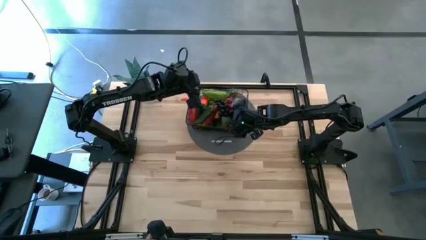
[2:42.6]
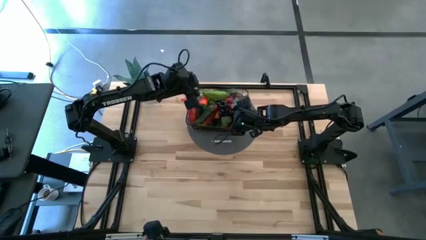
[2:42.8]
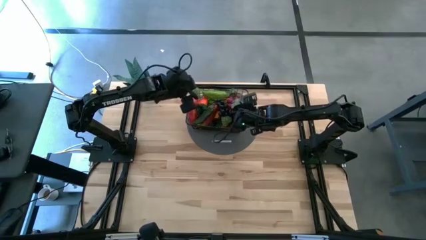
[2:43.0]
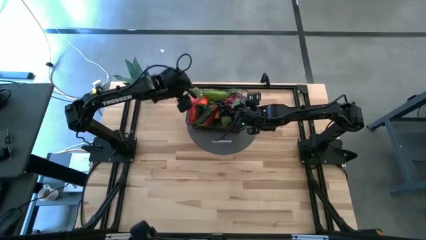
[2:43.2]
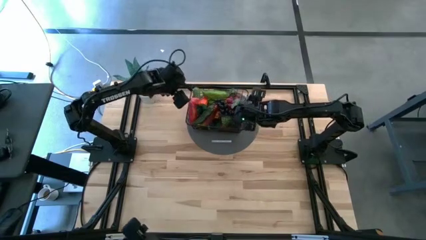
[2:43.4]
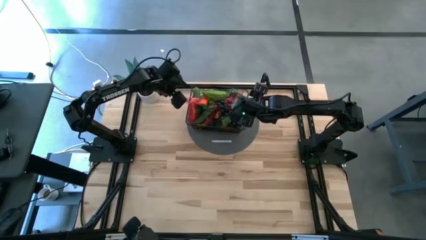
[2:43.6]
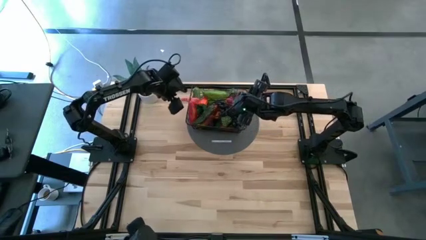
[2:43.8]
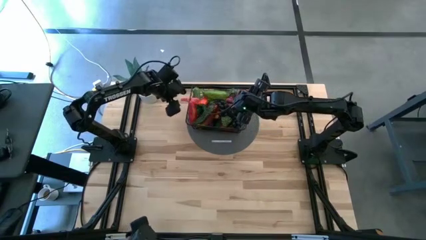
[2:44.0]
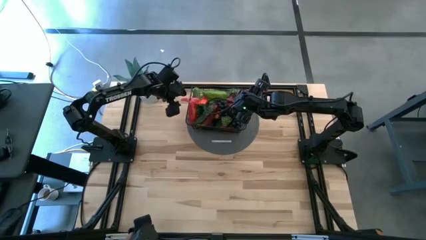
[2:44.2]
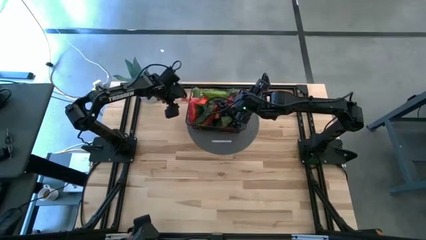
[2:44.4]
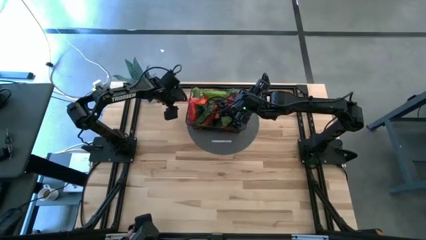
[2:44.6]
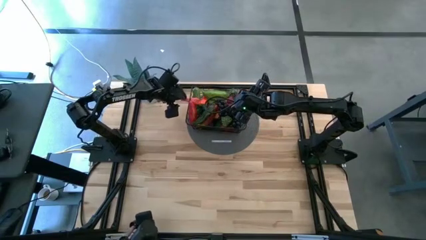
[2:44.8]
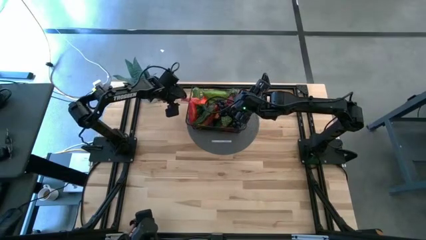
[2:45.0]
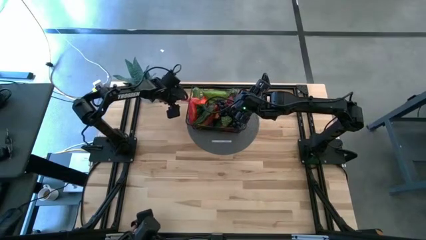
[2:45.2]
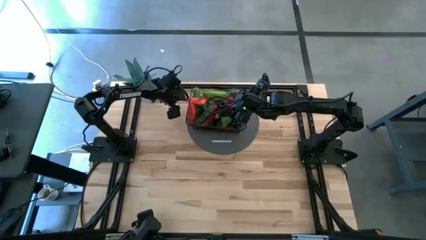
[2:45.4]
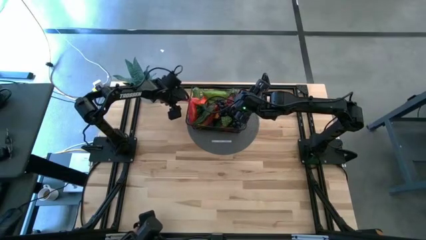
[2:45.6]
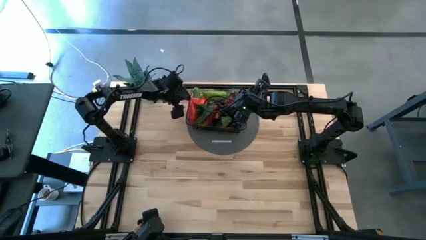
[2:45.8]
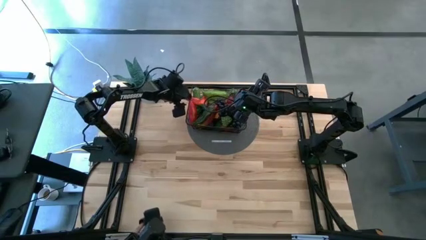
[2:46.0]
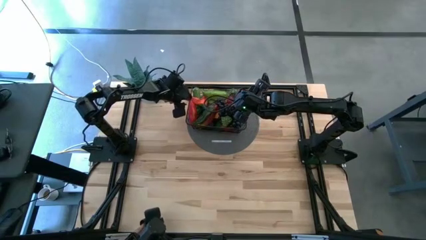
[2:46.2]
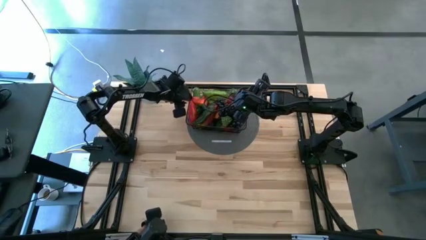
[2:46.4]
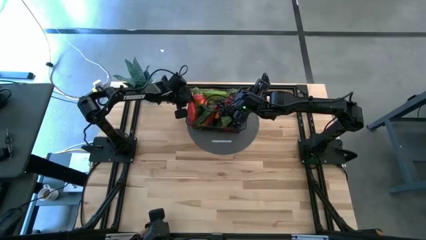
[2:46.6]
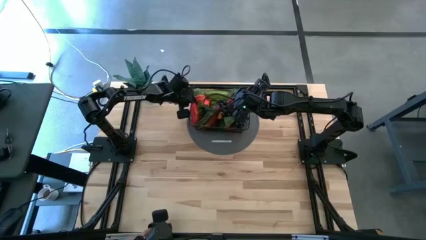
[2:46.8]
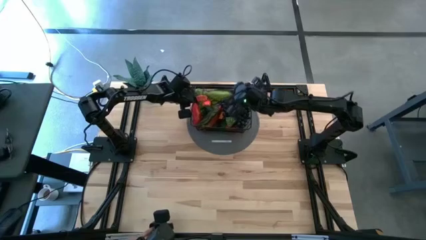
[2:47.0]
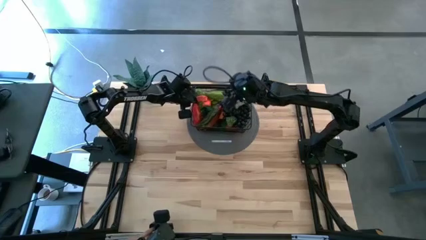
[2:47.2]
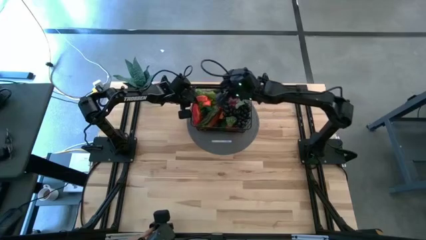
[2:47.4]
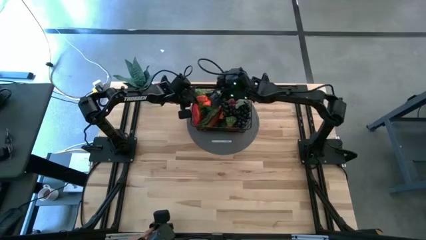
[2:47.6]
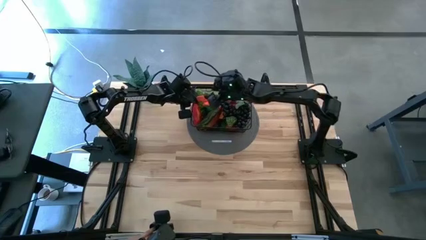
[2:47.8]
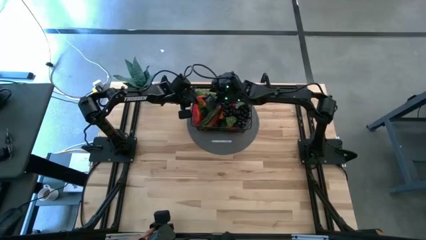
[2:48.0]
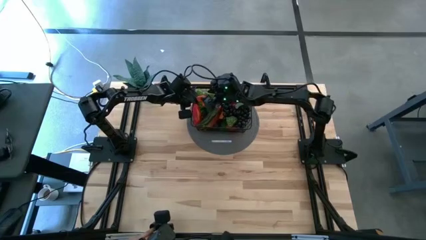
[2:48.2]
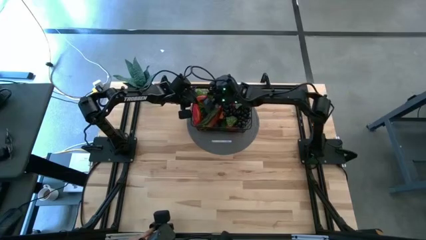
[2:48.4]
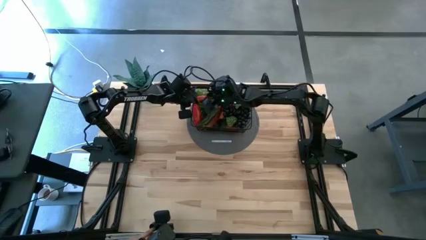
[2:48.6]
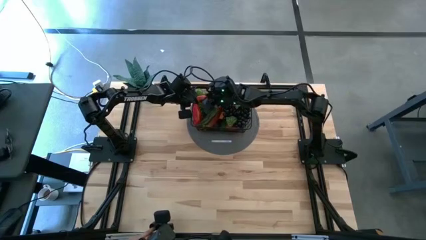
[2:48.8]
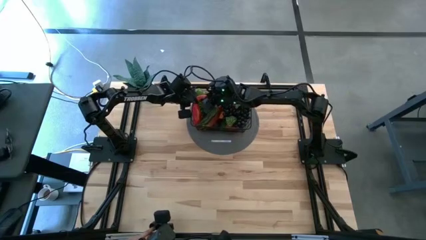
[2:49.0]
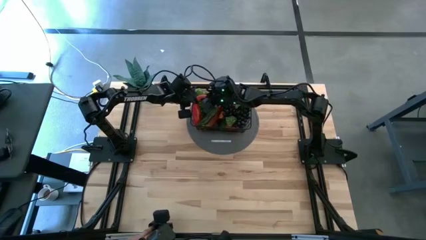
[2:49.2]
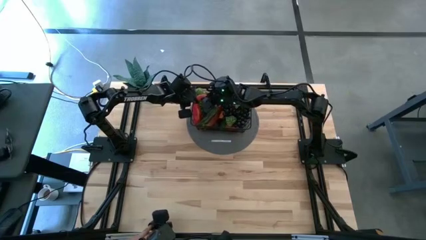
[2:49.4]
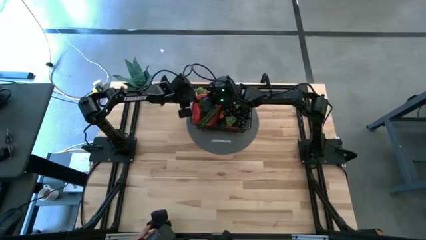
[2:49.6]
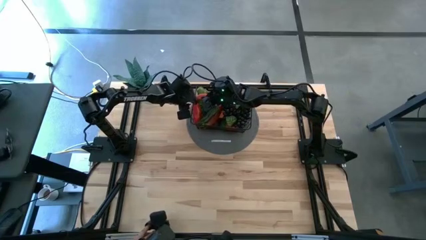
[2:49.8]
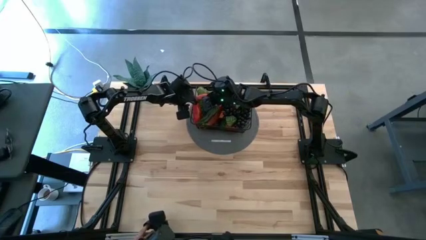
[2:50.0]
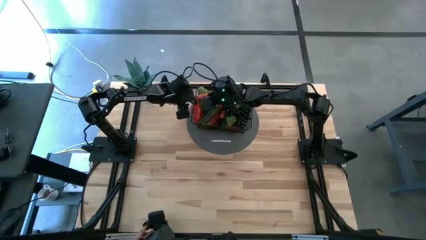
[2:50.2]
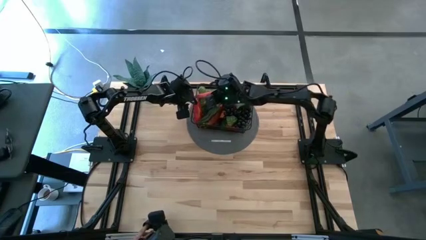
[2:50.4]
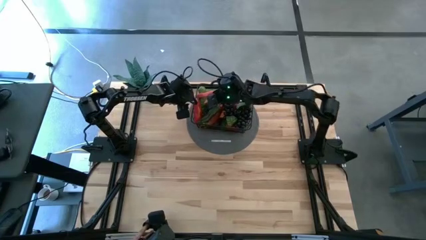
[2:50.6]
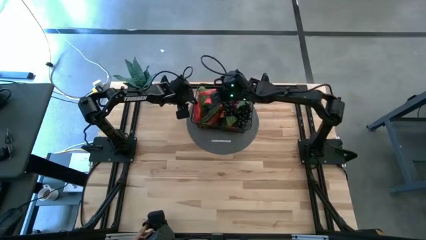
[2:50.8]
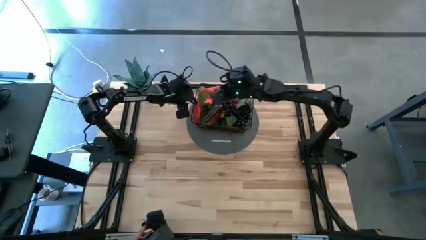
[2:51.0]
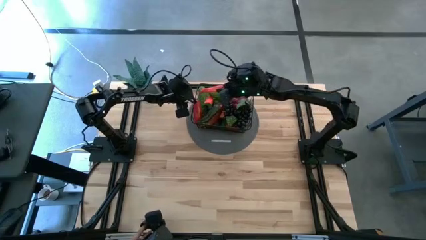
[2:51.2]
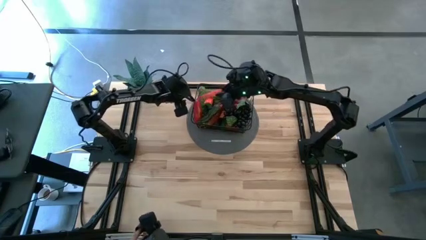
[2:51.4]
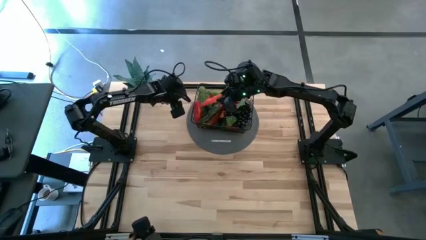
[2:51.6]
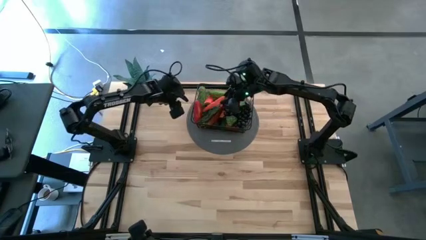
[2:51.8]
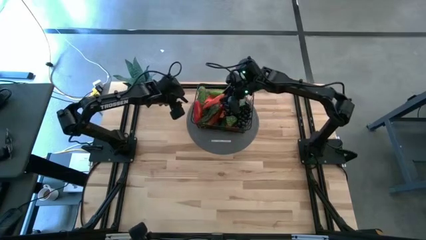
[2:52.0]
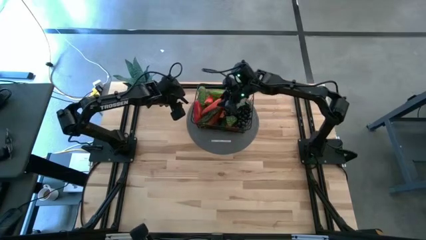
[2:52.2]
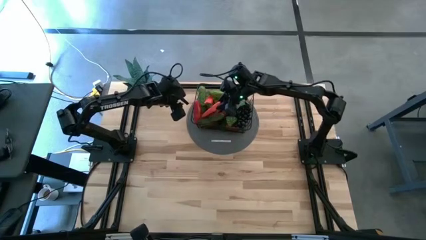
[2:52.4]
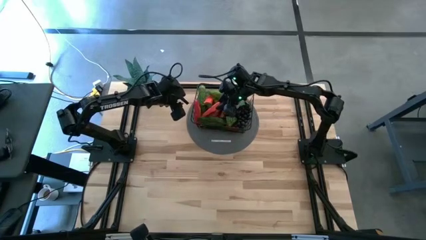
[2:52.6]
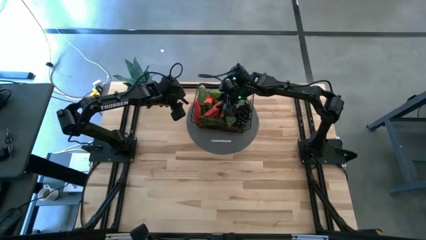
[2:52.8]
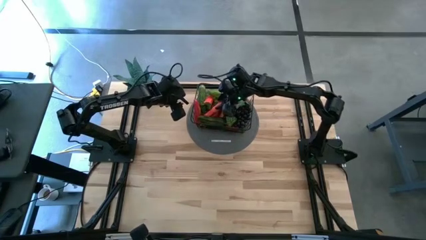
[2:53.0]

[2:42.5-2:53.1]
Task: Build produce basket
Adjust the carrot on the wire basket

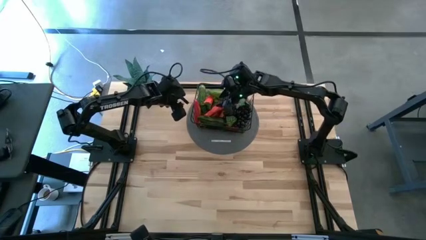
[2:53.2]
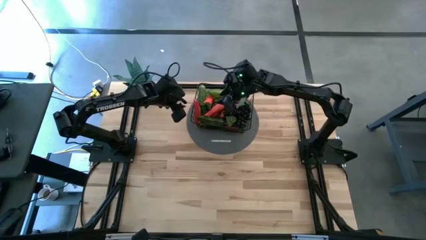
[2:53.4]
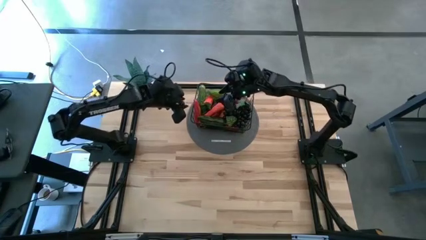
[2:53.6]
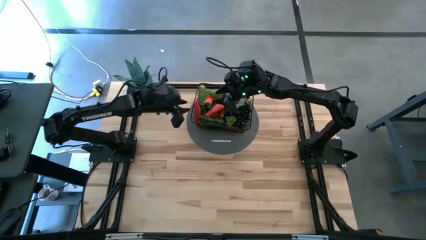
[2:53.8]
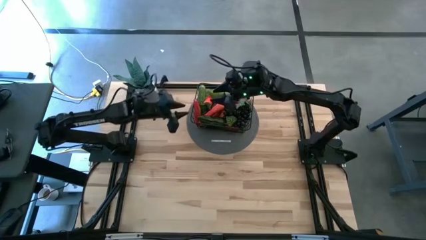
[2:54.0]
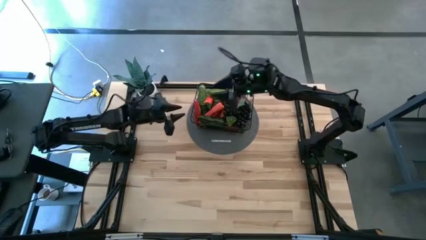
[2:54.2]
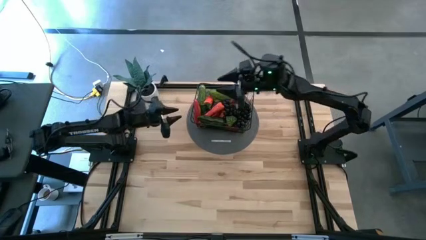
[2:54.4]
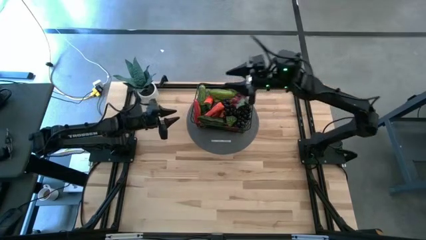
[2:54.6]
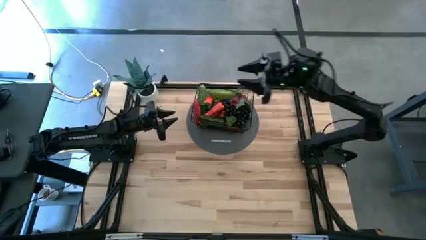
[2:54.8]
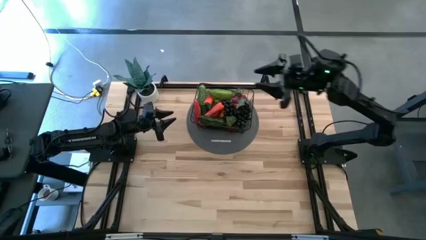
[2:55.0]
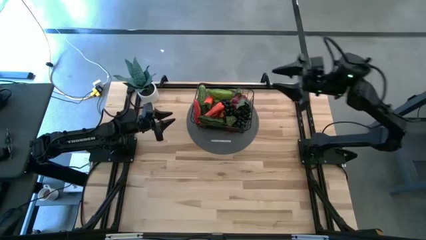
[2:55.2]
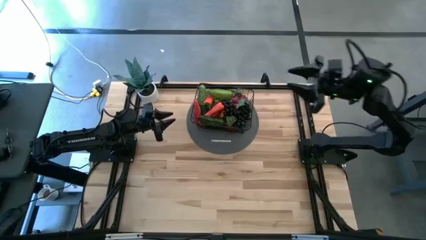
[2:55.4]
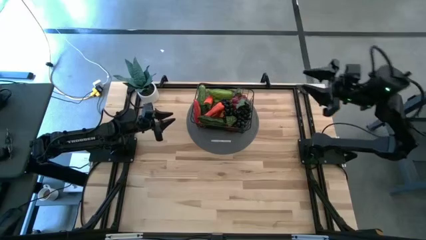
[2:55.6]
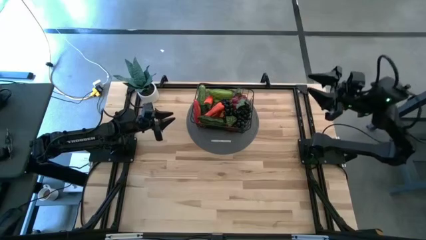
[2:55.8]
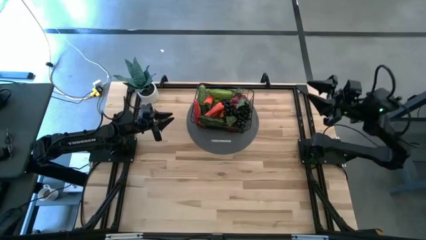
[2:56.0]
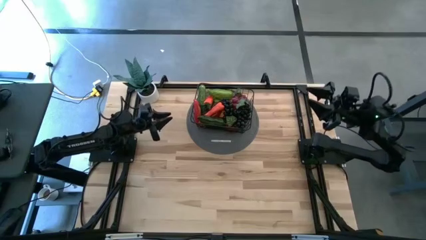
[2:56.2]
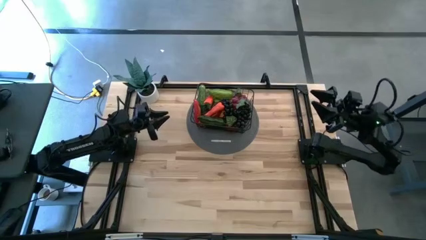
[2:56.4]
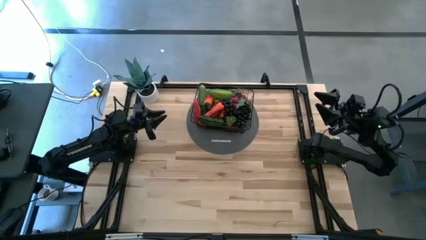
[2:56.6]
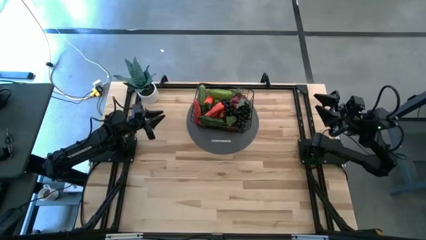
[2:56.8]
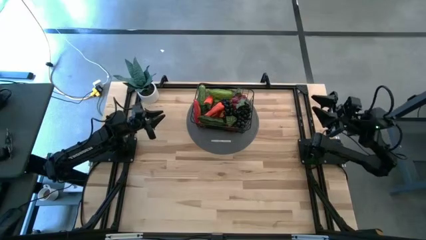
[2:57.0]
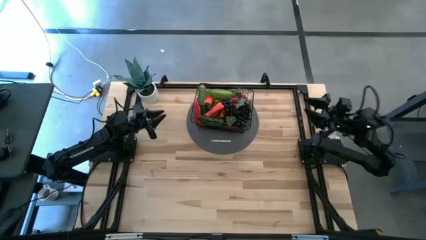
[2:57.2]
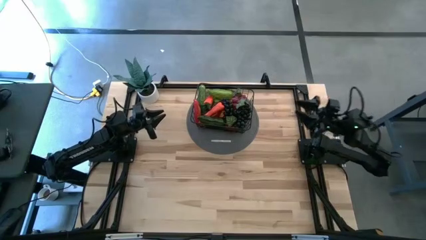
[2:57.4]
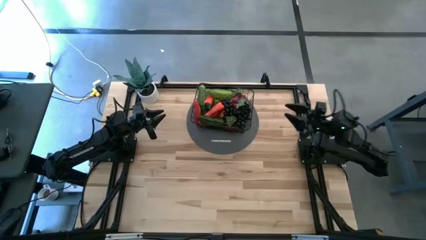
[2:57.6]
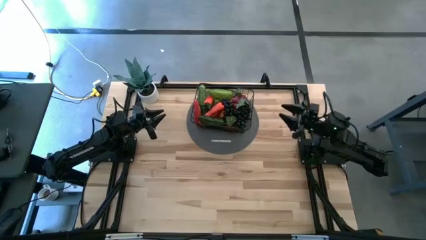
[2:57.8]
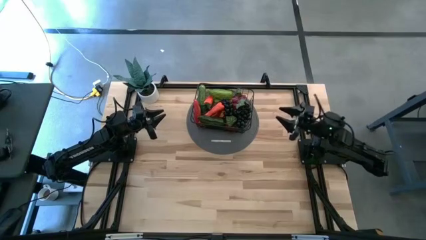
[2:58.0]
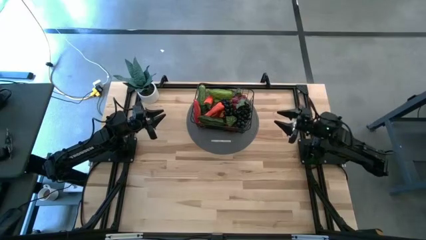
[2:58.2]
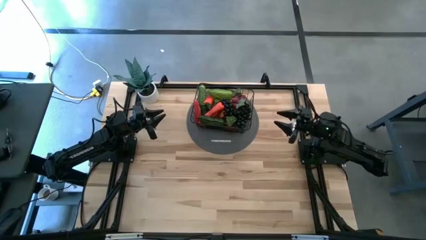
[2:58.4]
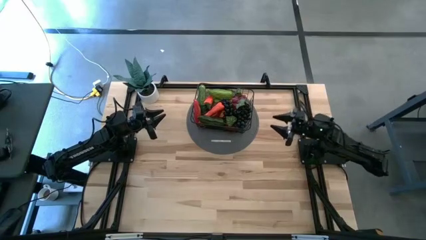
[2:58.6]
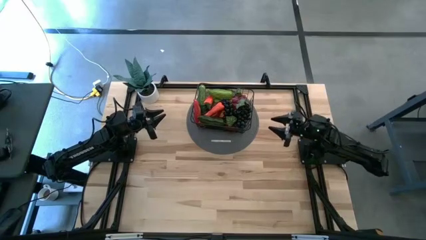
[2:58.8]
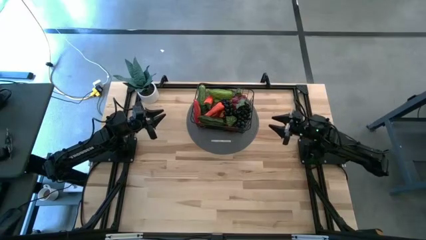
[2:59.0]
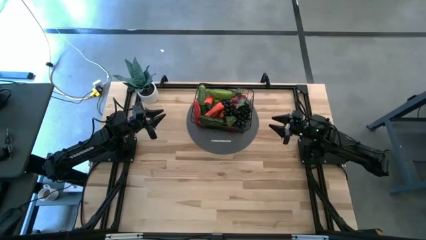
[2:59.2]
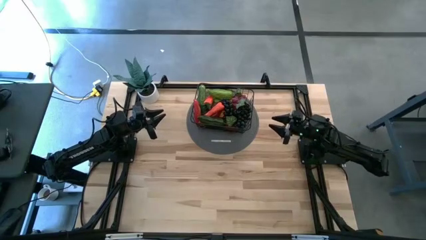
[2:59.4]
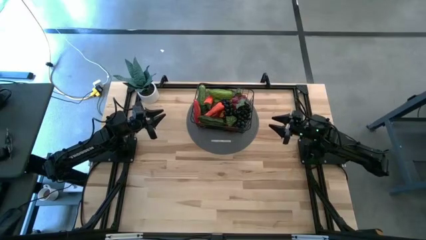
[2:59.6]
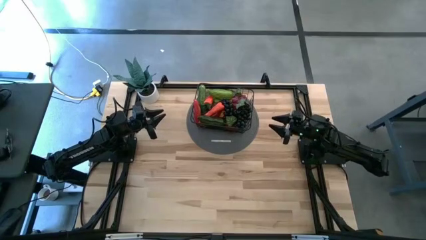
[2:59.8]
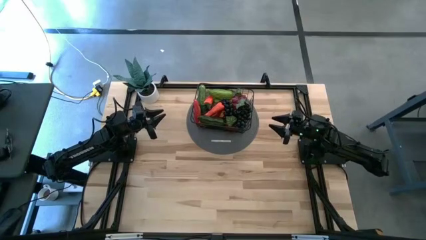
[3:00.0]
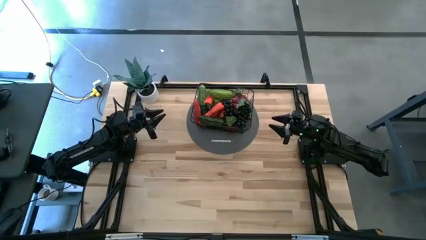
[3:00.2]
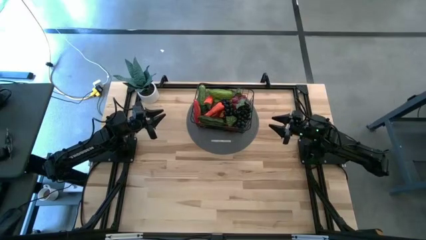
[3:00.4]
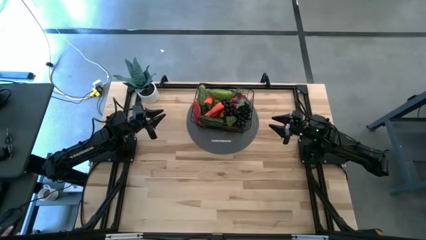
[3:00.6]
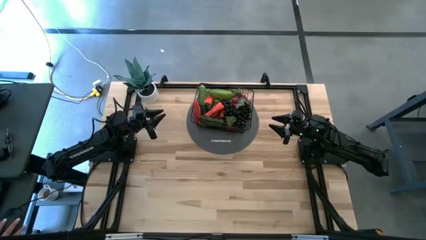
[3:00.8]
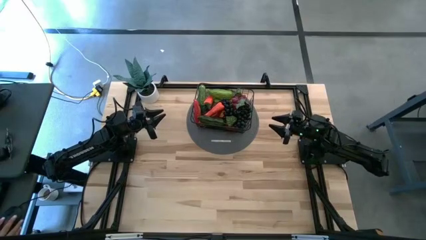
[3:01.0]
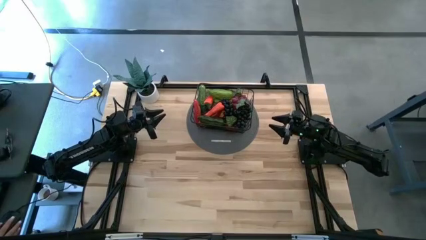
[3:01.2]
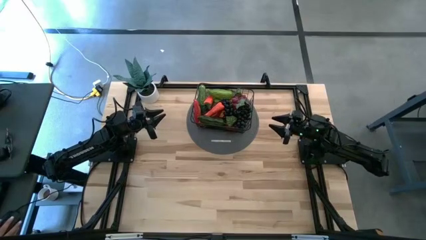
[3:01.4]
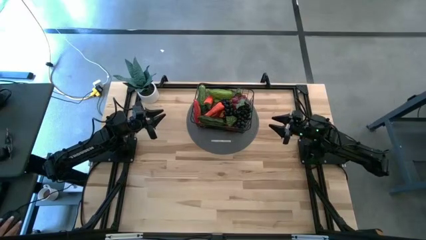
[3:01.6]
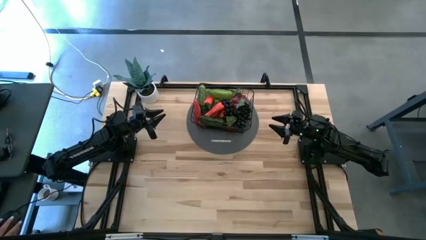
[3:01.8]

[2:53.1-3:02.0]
Return to Home Position
